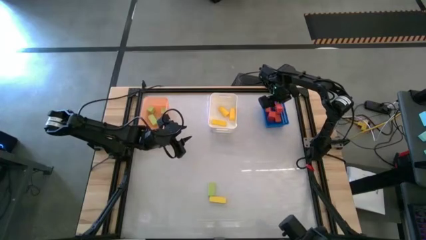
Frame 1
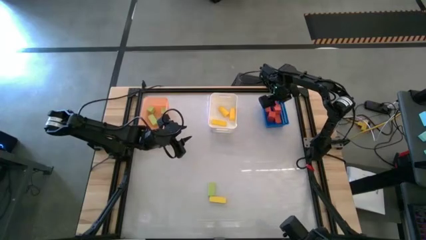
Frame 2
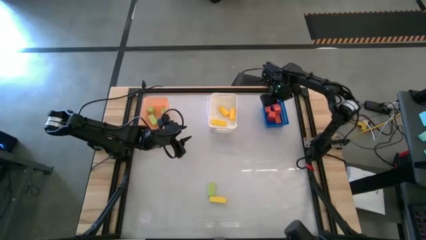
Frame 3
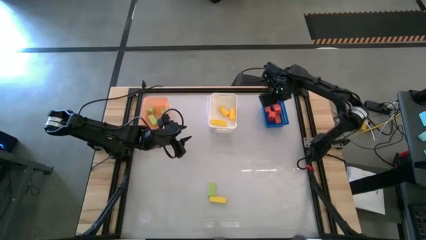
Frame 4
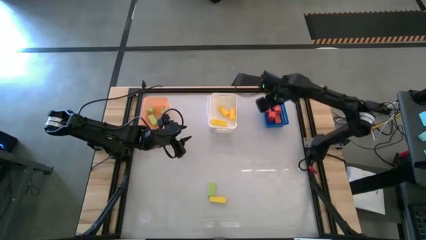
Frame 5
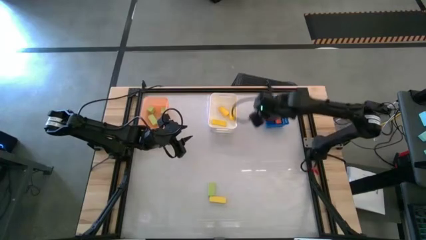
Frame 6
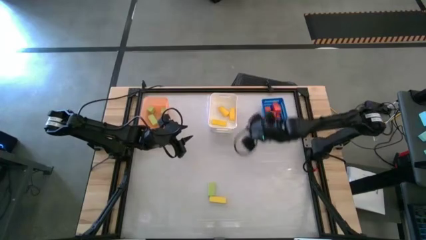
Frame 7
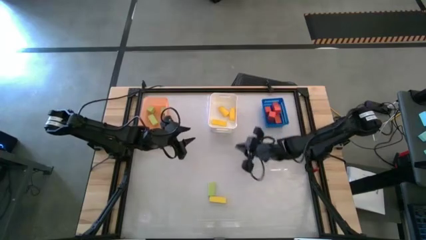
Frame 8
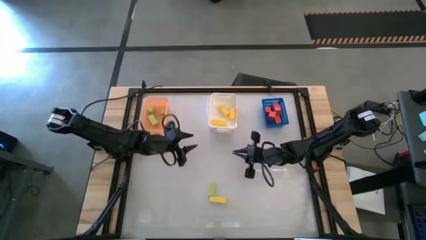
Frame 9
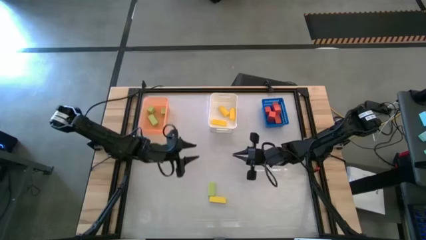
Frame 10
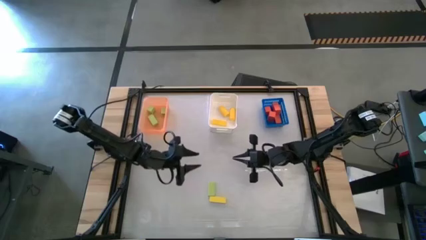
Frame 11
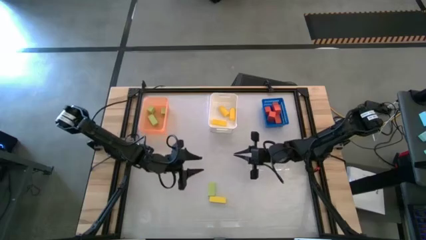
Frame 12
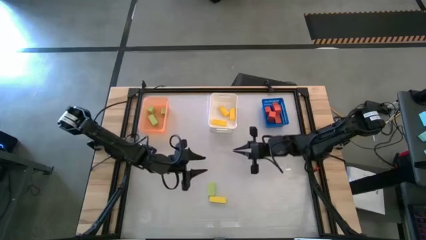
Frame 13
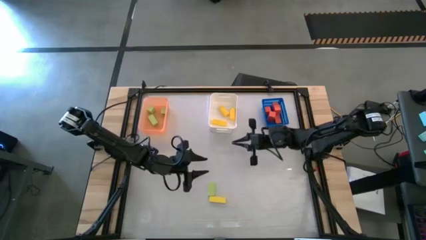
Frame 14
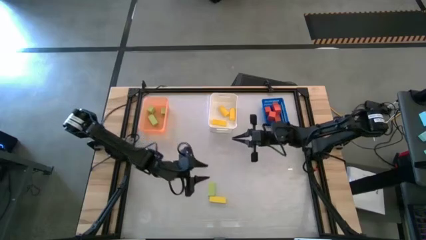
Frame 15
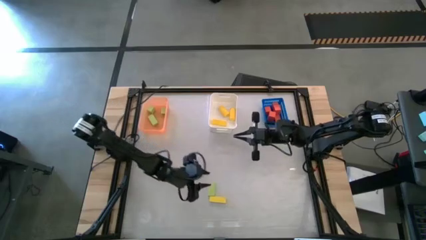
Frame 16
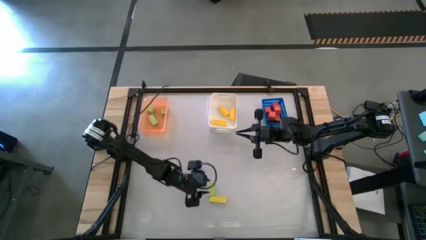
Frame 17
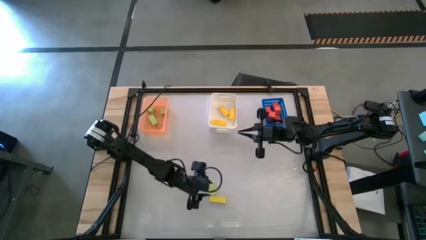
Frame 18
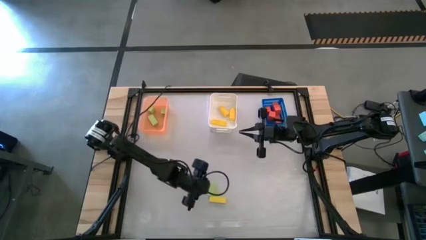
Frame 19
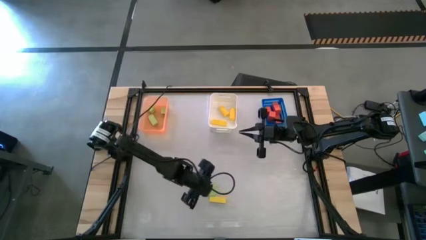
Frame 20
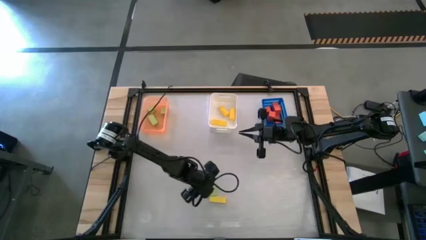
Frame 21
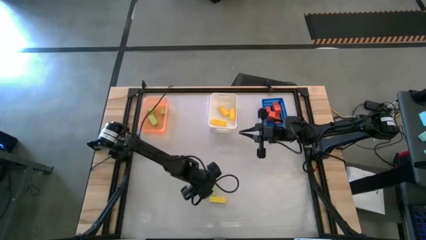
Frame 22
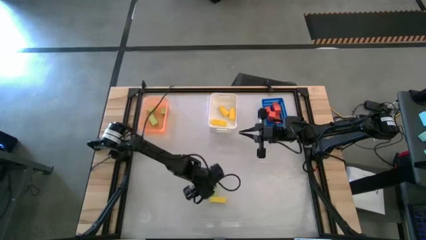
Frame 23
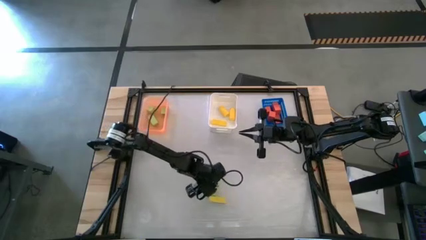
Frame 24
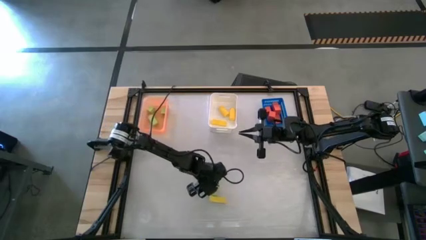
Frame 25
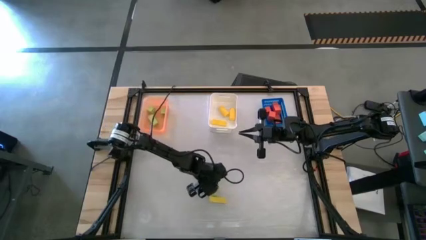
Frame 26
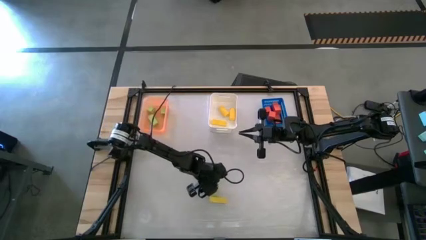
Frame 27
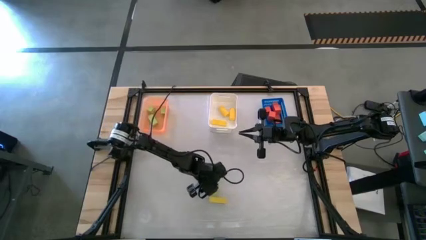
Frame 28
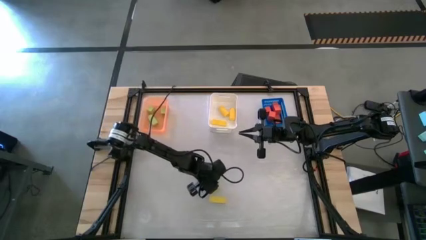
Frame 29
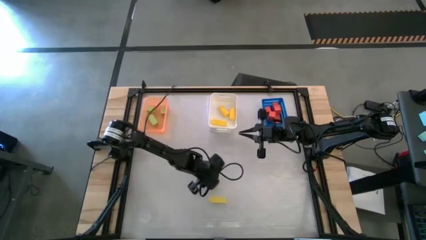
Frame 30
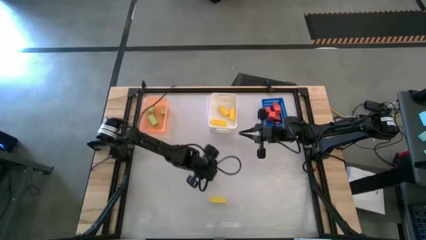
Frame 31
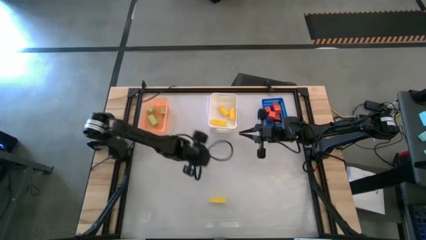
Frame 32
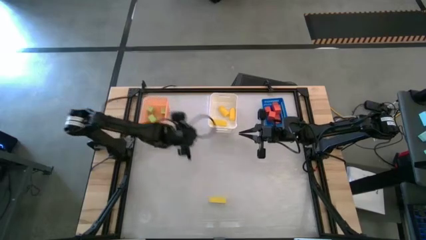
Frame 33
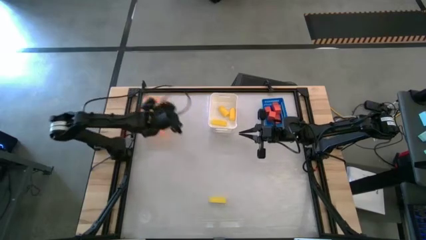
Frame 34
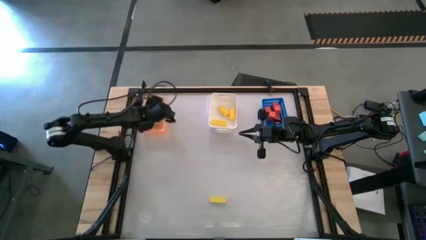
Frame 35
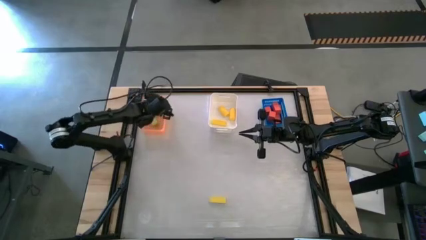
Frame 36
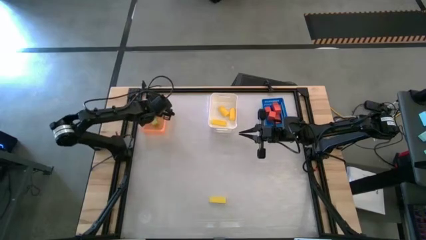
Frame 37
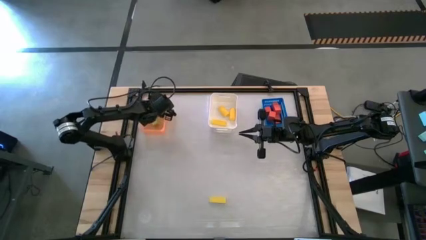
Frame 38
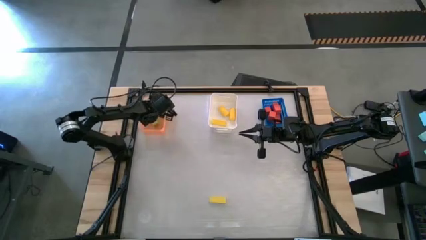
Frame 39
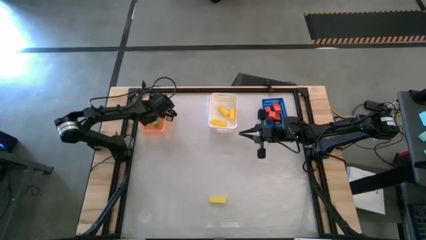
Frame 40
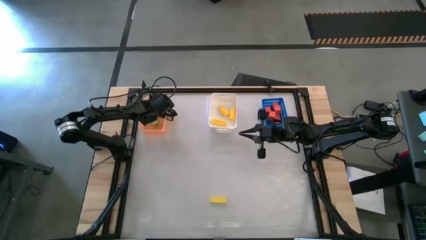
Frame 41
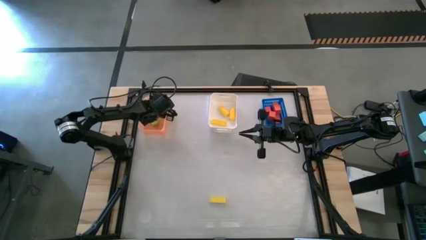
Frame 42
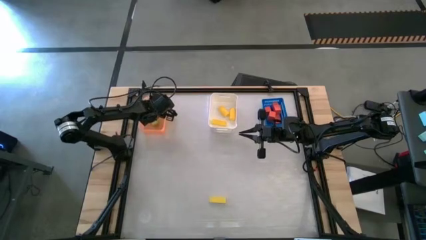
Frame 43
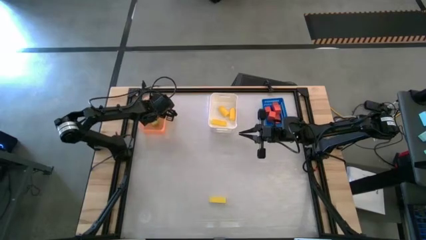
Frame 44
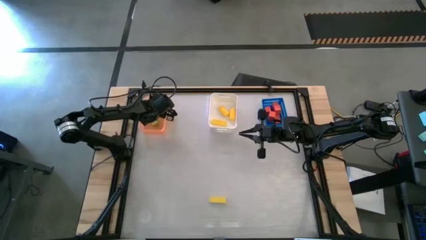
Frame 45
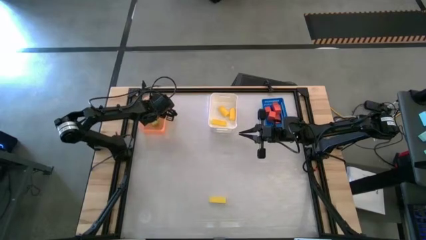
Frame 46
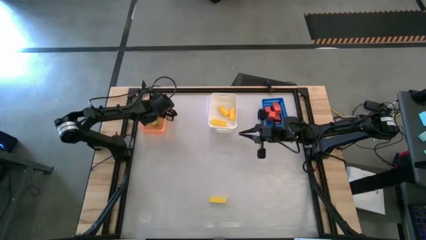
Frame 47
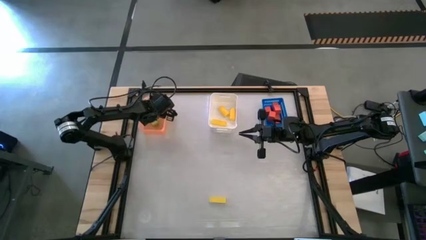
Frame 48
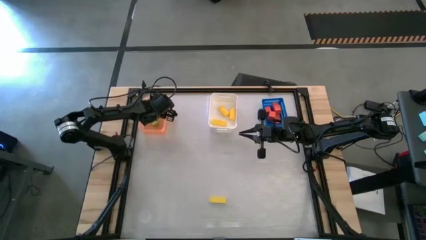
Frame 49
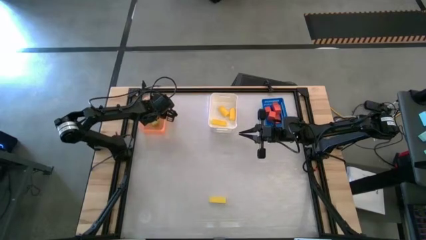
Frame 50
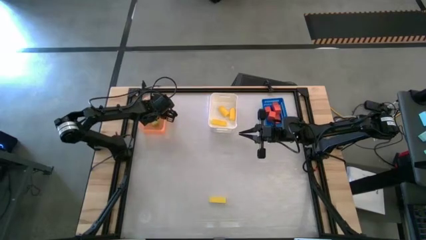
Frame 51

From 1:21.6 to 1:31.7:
Task: Sort & place blocks by color
Put the green block into the orange bin

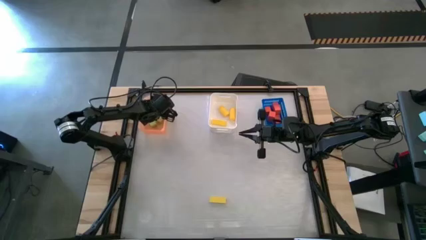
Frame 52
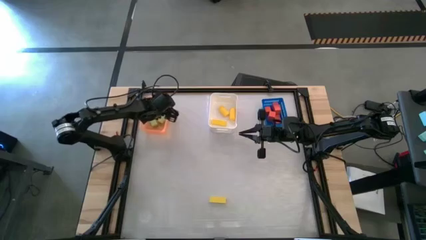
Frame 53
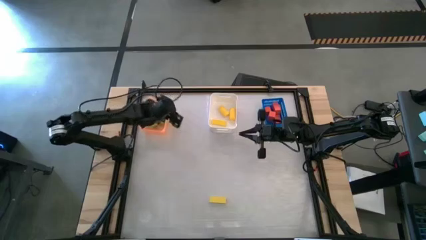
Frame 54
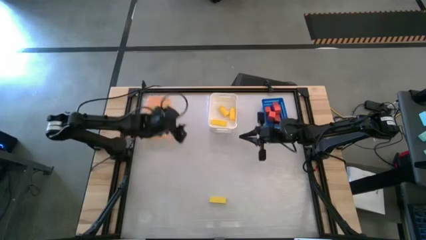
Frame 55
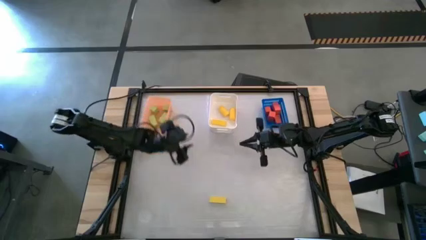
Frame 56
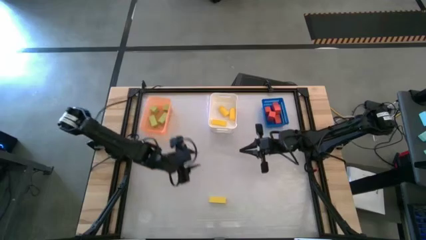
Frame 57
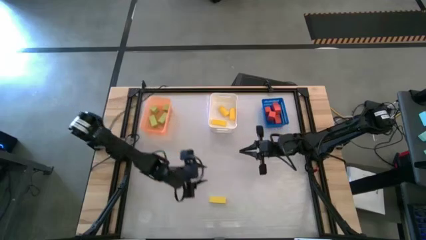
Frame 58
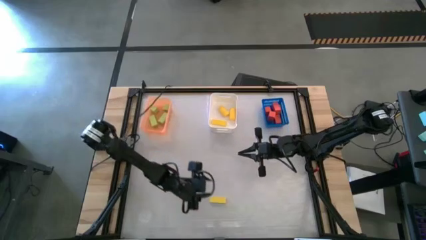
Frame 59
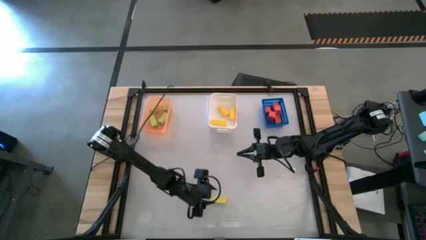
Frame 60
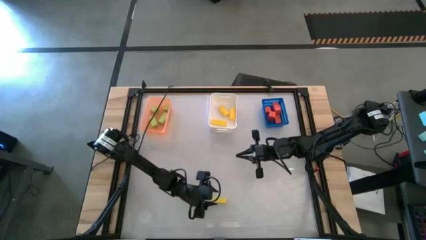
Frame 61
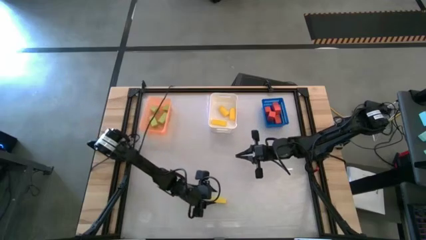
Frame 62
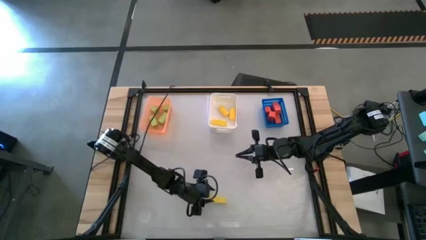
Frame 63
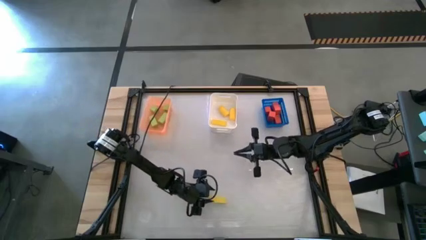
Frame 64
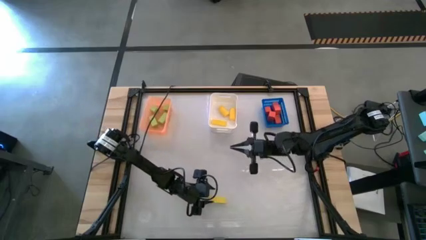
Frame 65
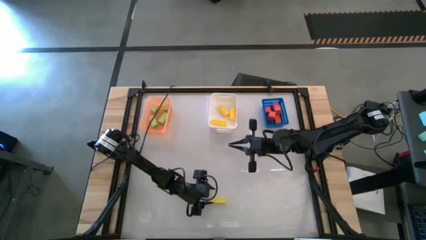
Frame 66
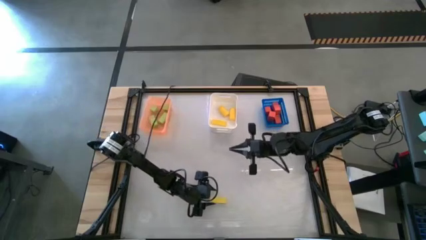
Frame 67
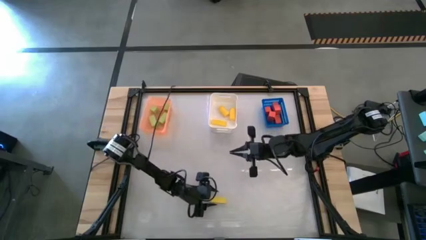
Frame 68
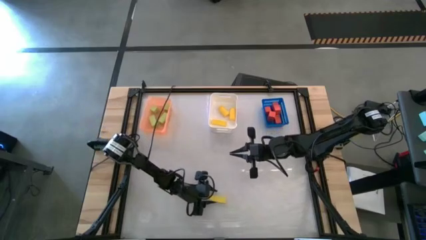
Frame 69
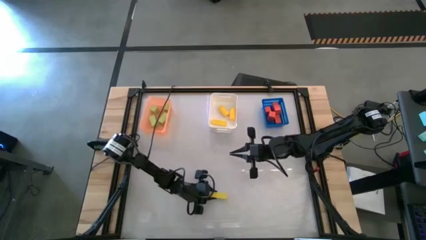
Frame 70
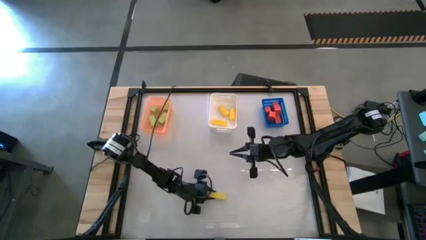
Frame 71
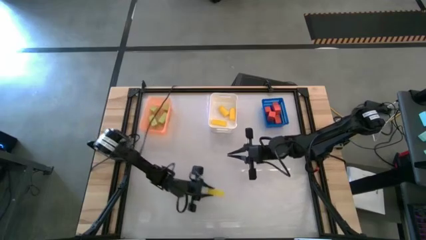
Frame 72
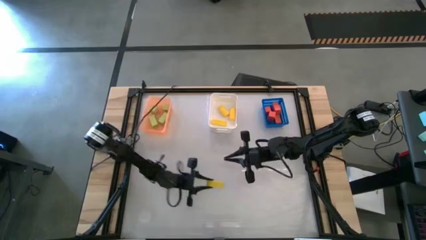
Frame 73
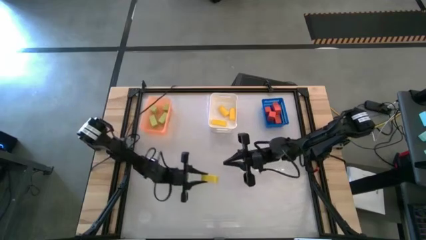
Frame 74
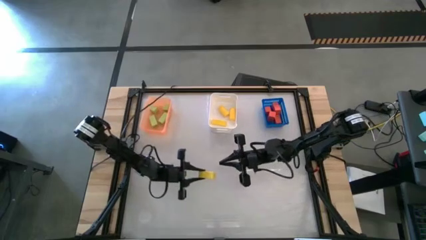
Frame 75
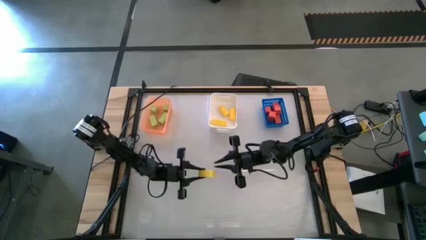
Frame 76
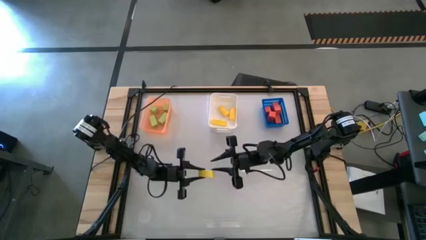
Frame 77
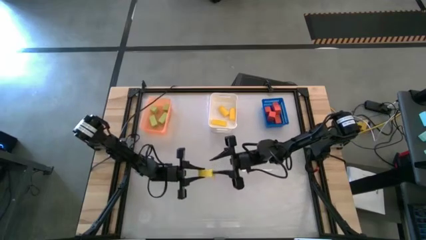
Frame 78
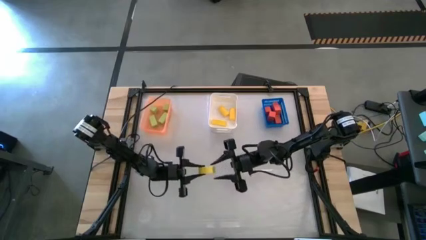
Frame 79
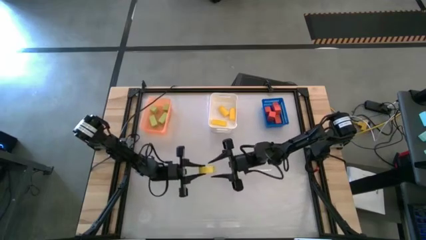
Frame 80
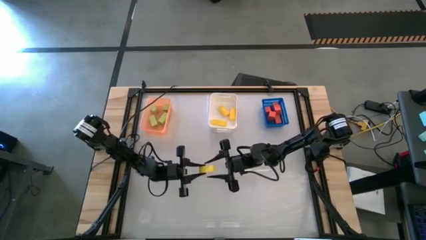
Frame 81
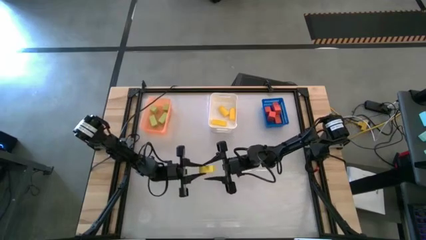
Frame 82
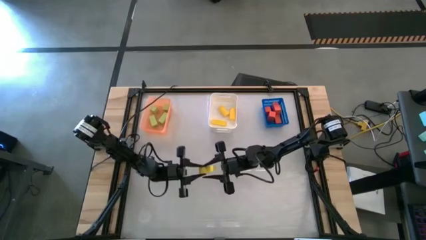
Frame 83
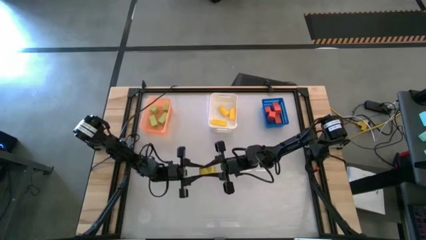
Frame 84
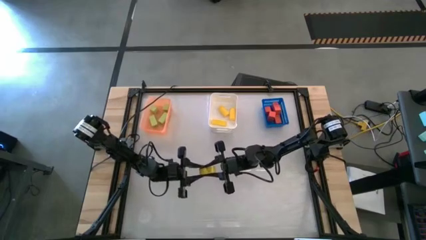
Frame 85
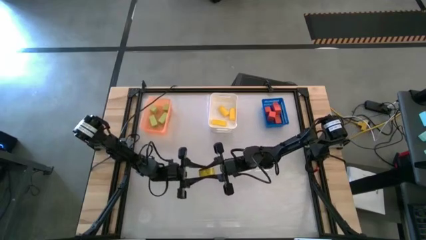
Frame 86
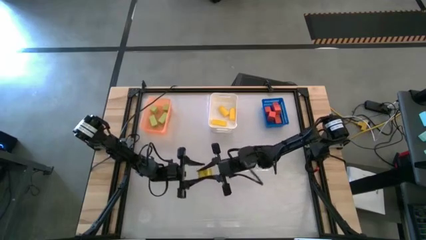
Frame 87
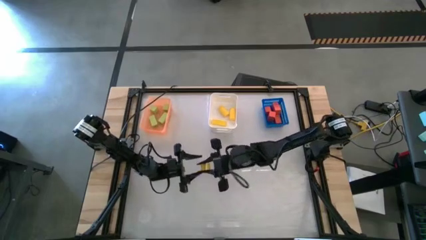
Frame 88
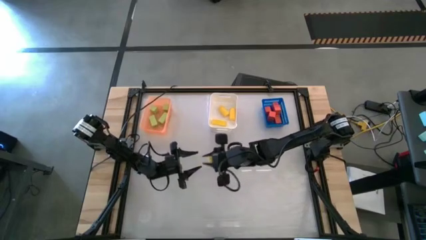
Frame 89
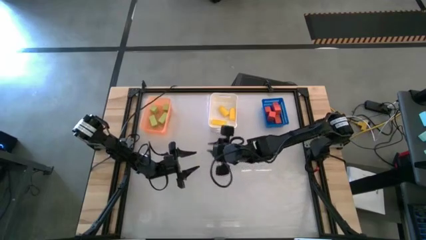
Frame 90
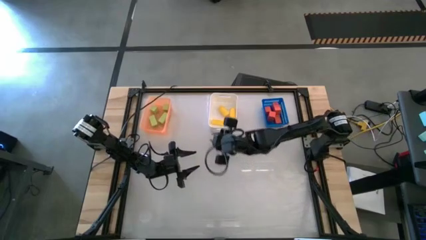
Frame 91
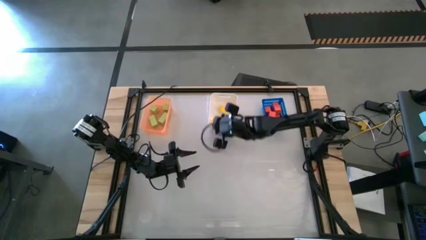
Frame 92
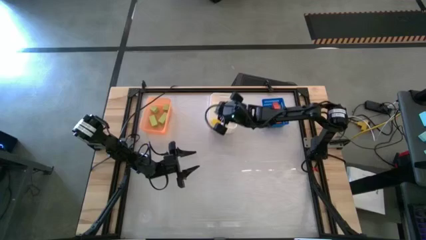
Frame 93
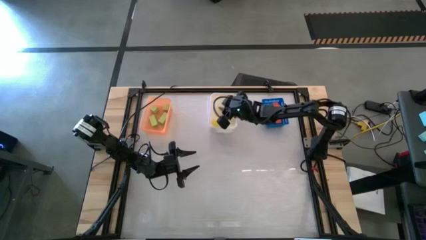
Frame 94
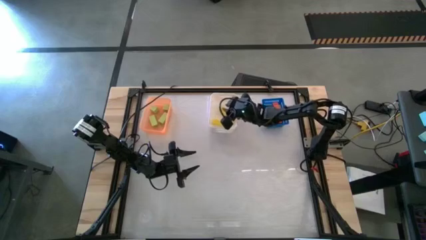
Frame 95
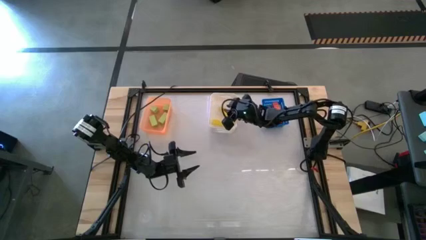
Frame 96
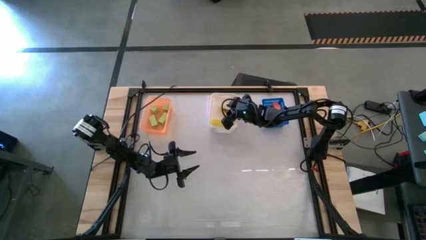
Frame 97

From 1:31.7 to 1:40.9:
Put the yellow block into the white bin
